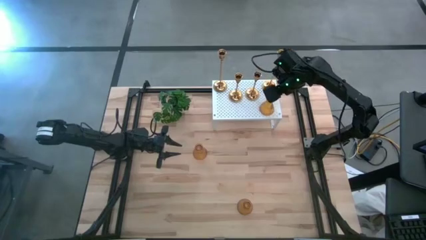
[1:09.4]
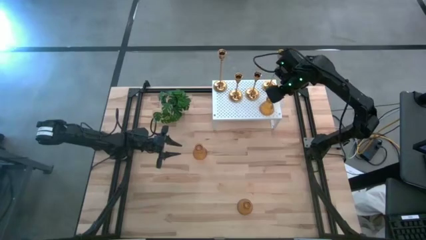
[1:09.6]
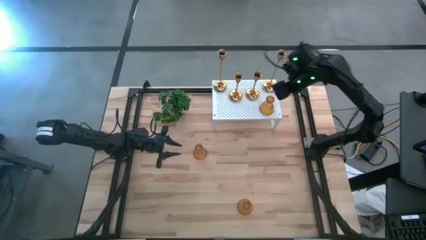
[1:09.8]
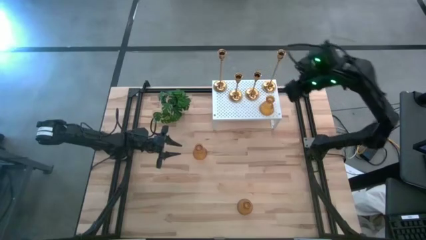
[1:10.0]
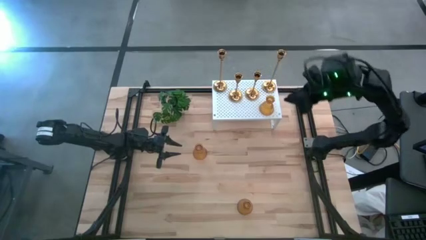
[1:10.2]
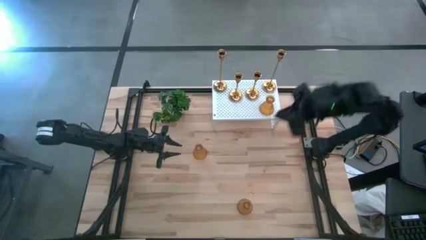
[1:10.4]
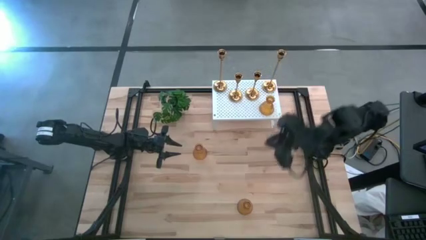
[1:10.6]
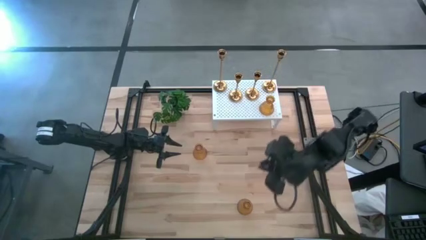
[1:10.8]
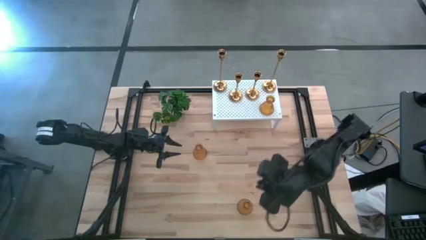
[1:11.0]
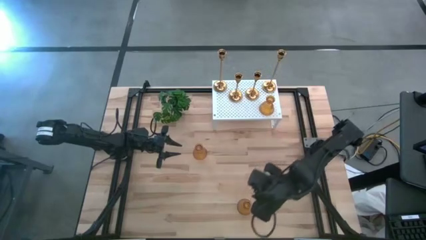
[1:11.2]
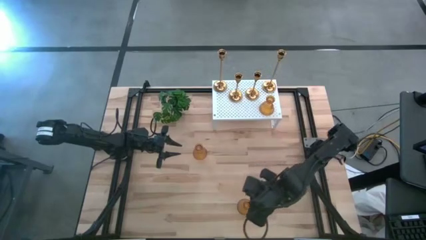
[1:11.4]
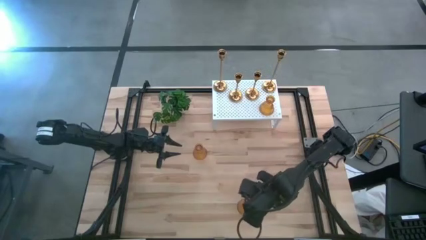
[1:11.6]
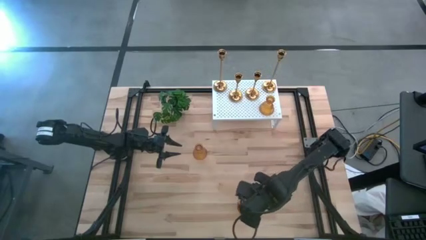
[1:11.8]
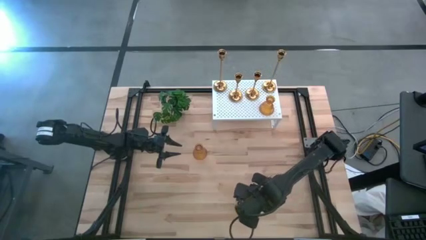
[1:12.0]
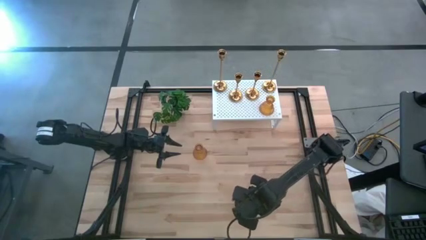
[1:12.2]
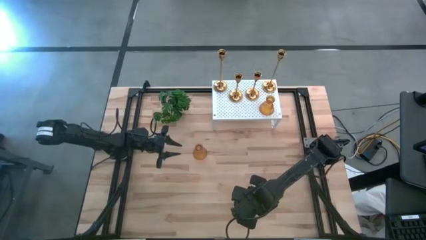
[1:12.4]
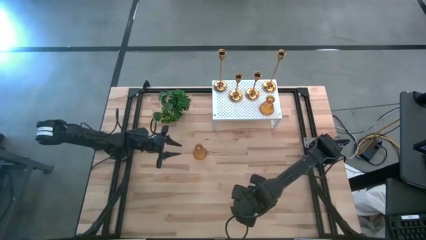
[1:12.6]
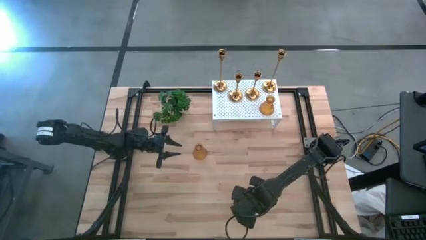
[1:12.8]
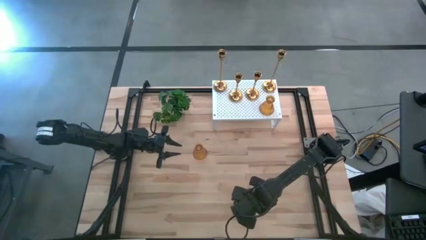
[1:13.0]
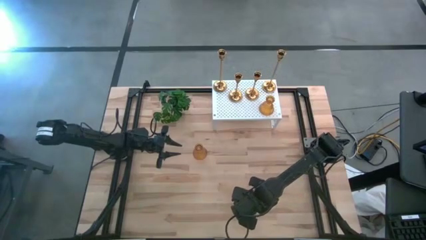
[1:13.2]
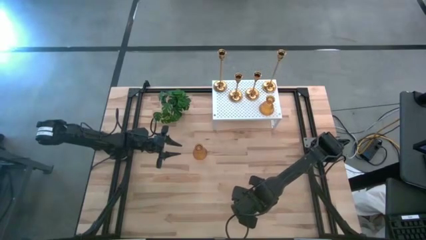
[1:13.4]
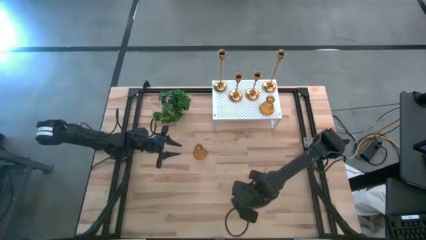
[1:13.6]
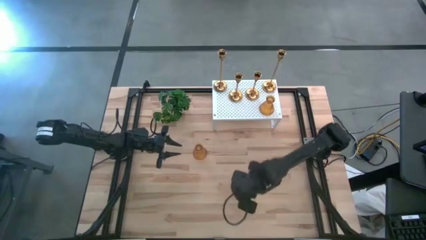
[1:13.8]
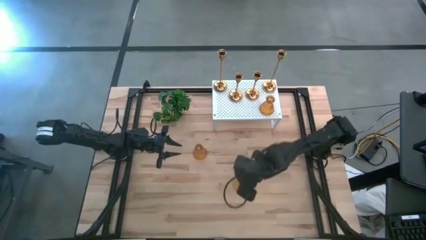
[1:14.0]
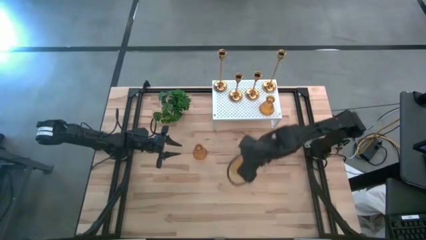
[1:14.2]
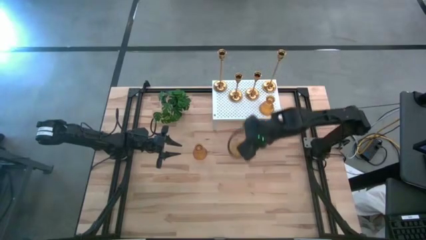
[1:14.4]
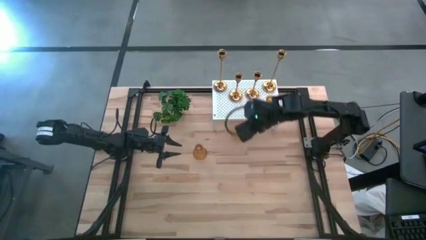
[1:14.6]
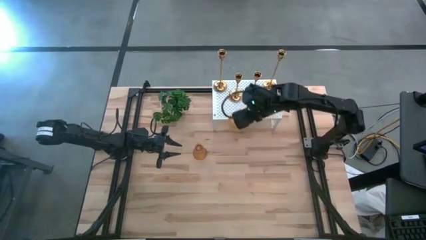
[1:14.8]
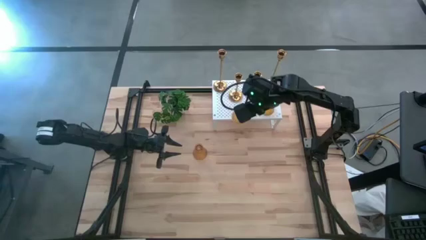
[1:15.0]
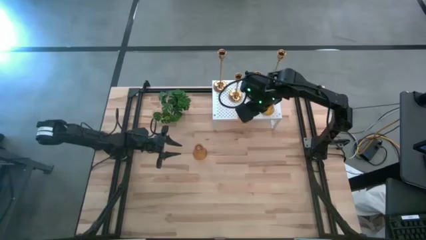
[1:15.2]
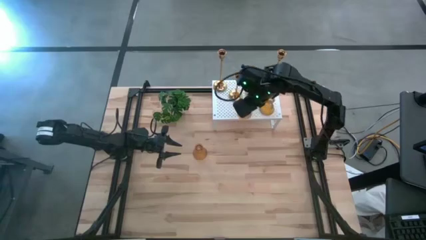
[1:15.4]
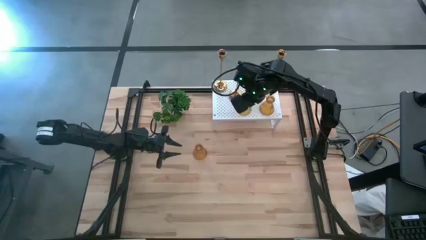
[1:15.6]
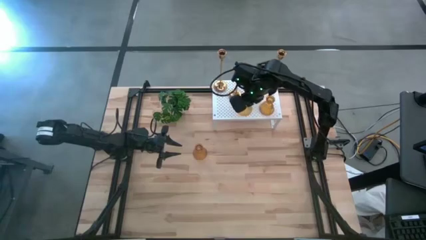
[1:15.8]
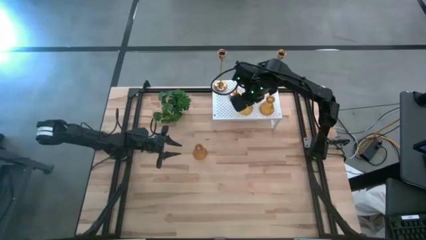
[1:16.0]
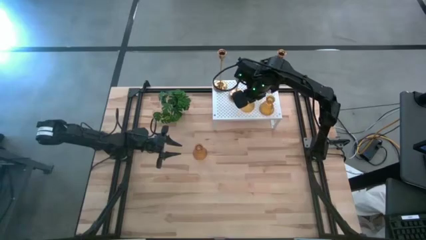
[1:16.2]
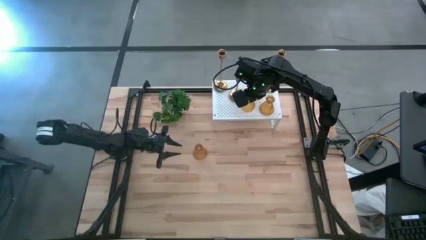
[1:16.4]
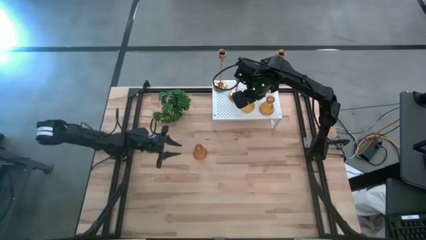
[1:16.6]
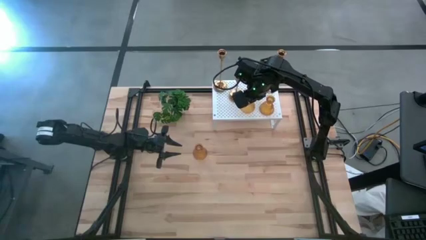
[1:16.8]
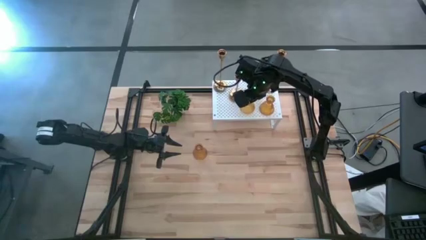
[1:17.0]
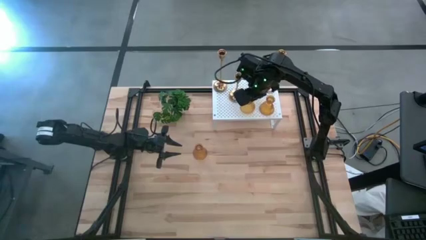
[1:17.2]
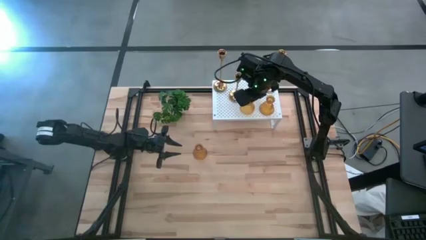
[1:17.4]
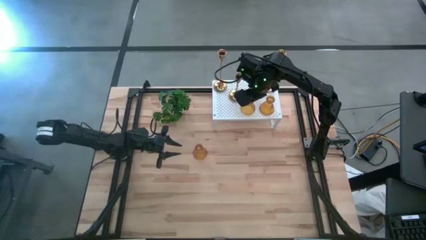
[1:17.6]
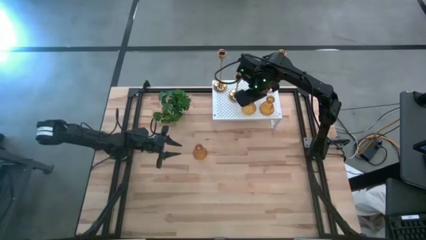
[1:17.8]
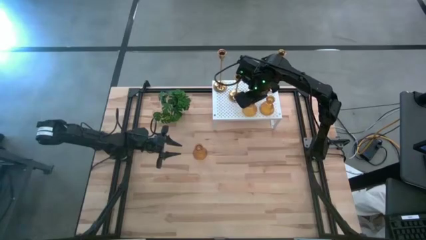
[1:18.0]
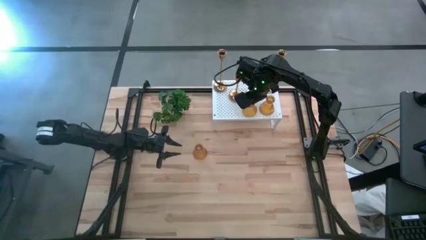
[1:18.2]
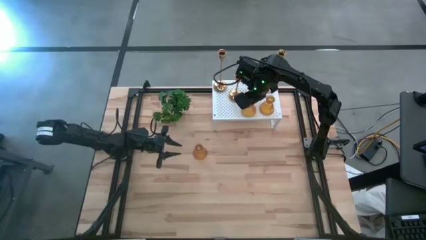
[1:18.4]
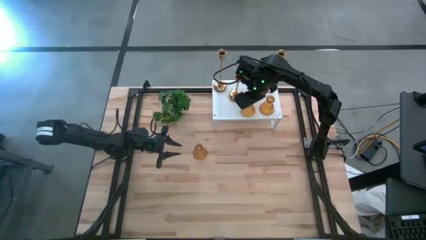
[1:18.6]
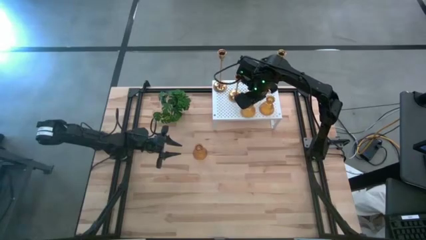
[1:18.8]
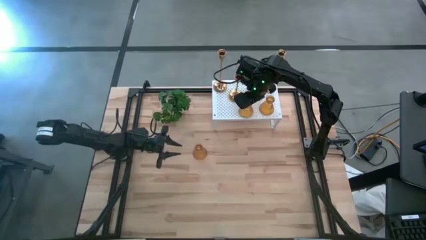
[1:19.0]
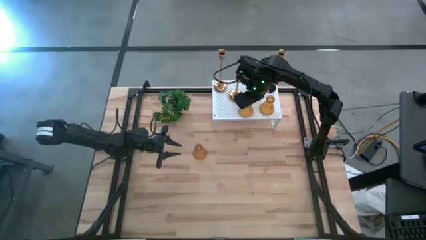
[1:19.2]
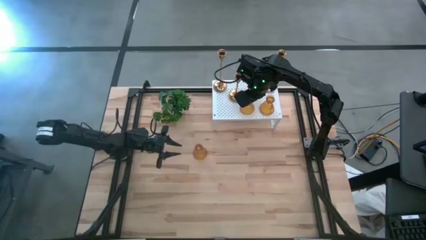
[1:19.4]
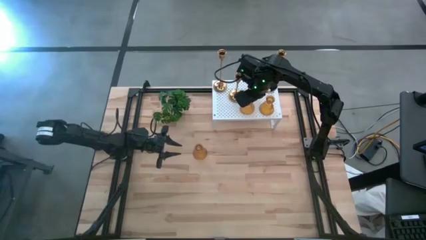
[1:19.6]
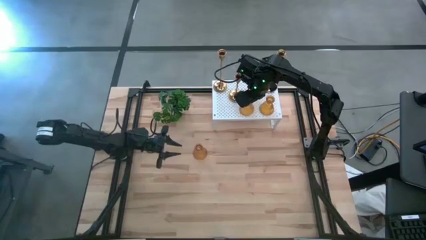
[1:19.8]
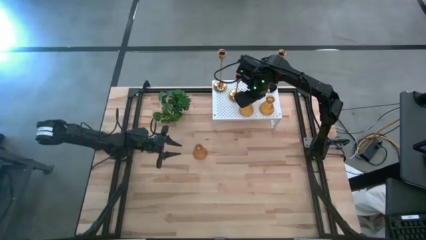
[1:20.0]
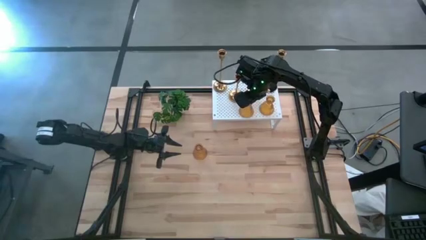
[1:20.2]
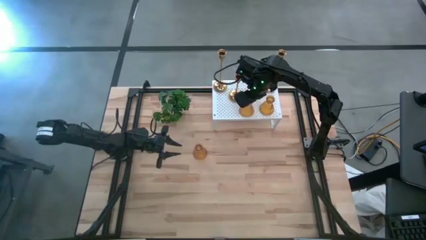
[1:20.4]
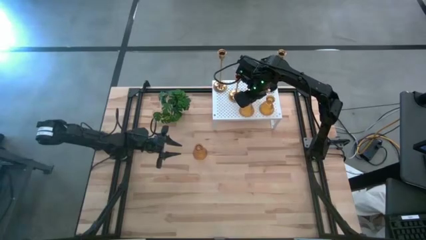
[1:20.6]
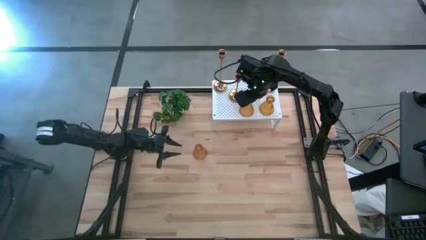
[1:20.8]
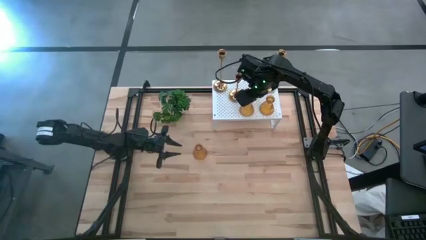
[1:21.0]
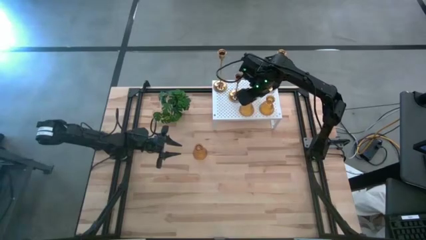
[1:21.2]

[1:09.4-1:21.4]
Task: Pick & Place candle stick holders
Put the bottom orange glass candle holder on the shelf

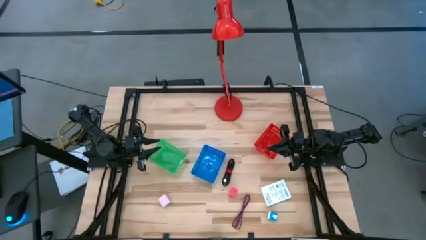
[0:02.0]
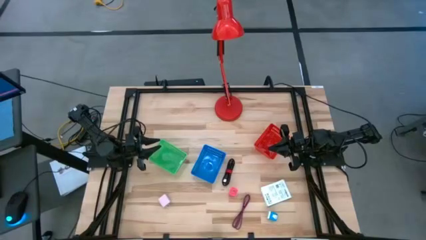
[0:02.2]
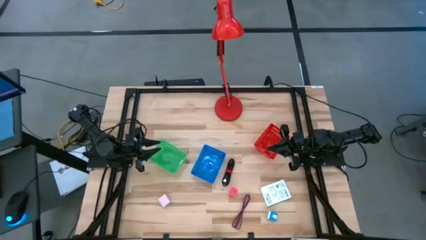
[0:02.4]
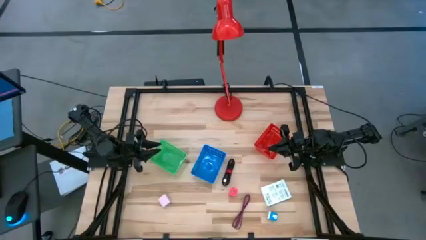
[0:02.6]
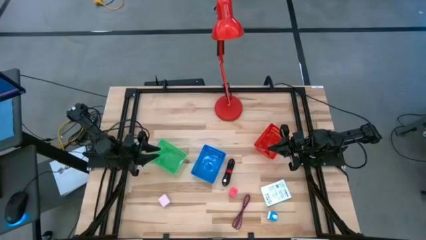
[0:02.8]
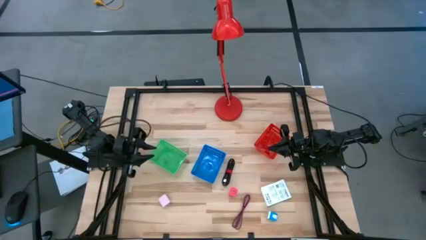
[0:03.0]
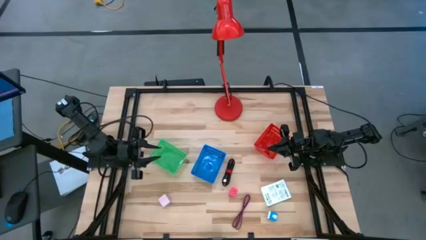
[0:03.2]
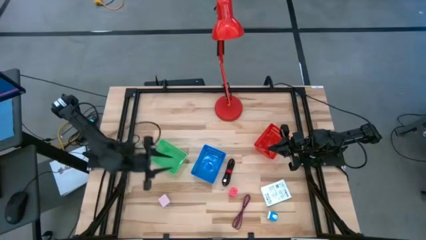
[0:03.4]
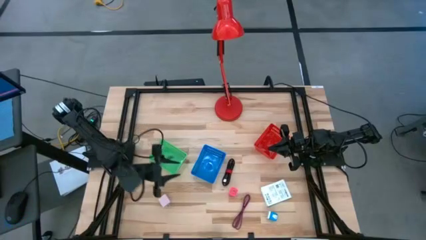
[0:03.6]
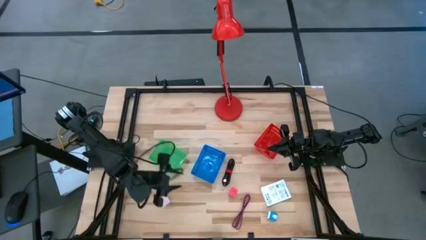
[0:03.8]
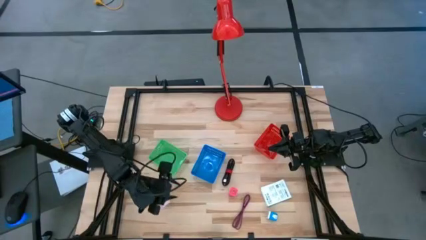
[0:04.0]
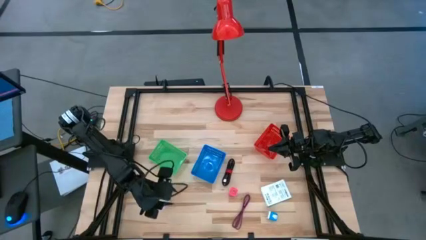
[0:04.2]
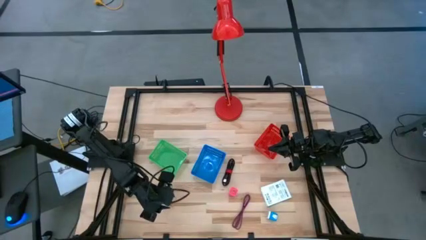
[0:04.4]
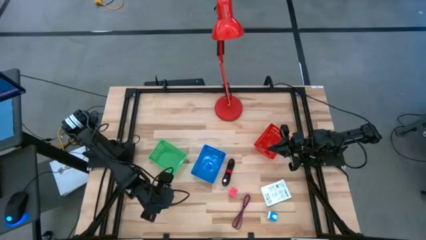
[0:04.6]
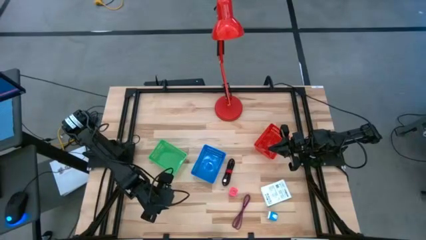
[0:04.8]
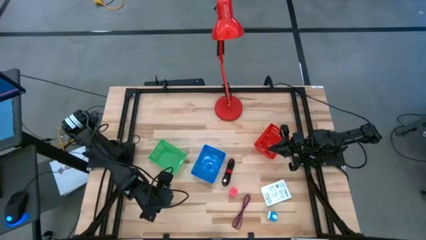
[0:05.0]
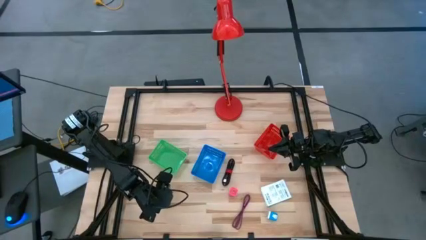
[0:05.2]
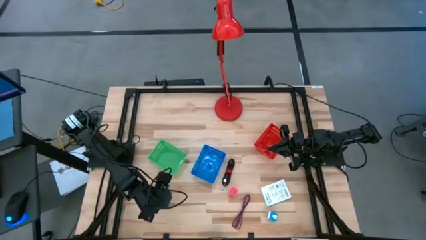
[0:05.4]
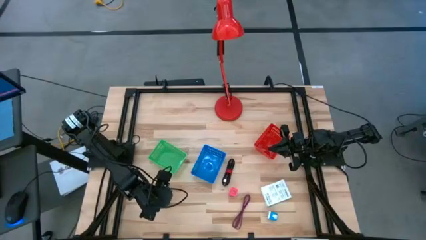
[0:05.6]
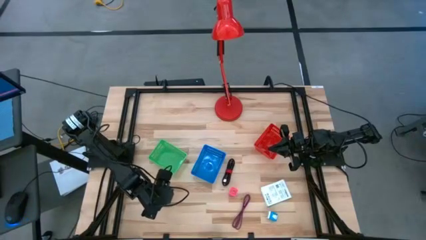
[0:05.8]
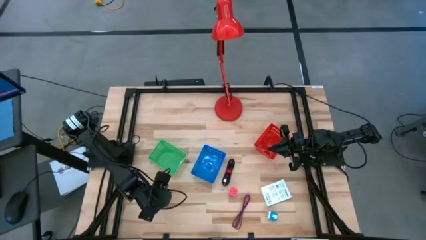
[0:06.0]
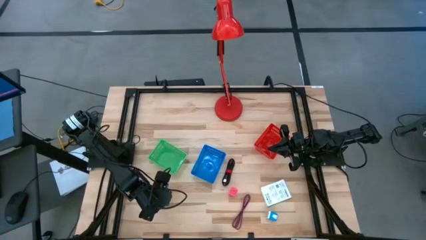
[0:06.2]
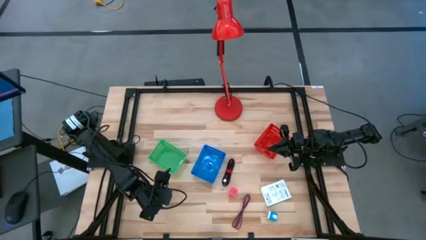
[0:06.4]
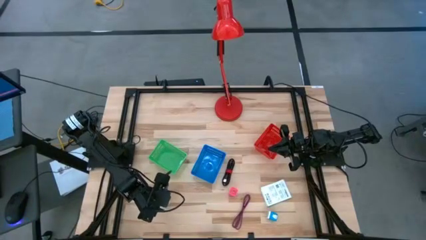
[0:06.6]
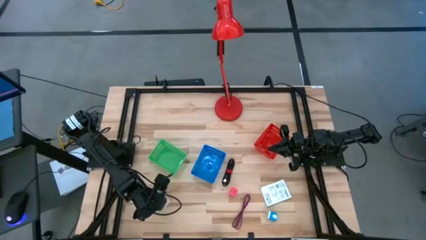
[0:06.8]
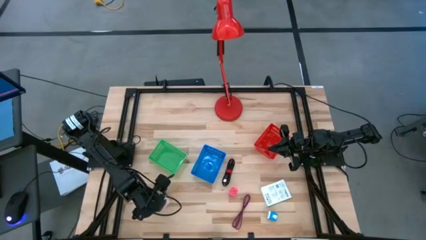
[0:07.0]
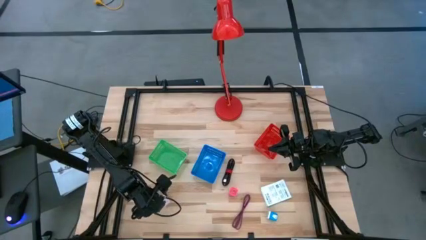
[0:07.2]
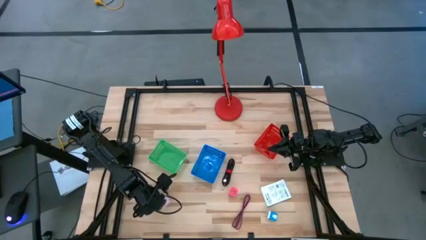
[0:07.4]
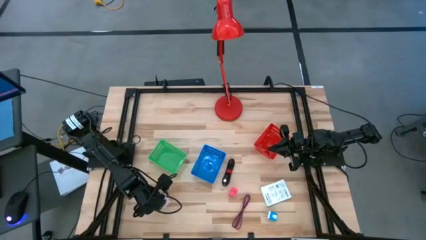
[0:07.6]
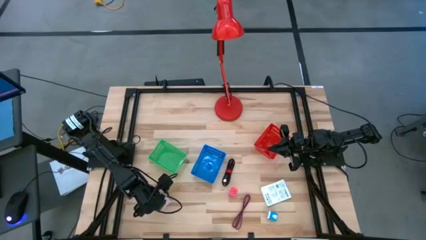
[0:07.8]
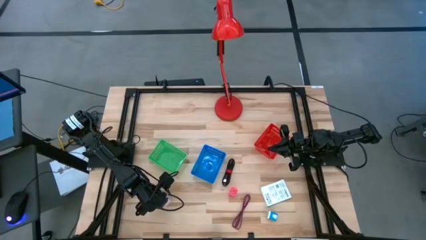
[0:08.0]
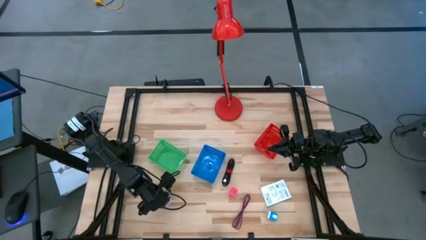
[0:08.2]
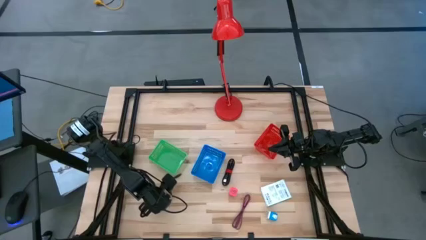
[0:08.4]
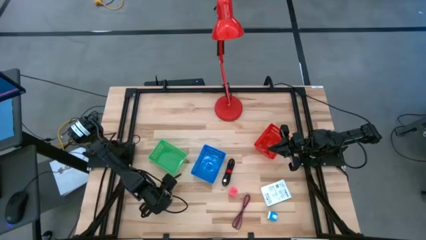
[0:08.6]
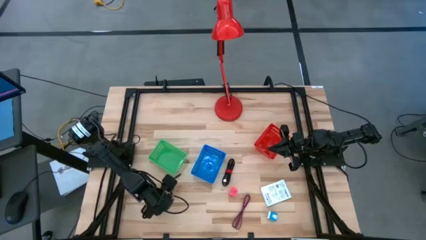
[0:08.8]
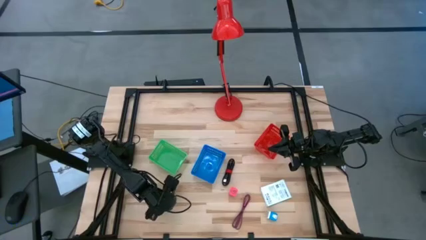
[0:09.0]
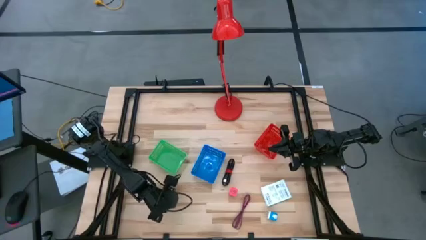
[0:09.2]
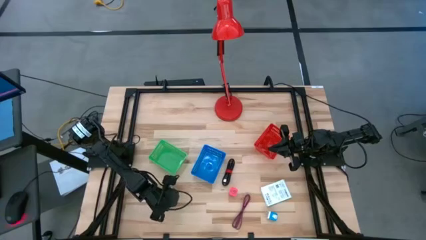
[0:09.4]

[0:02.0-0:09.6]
Task: Pick and place items into bin
Put the white charger adapter into the green basket
